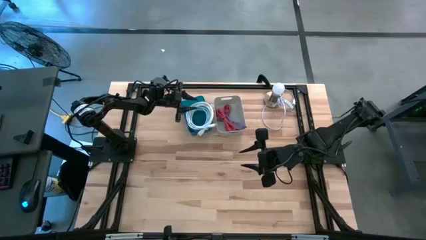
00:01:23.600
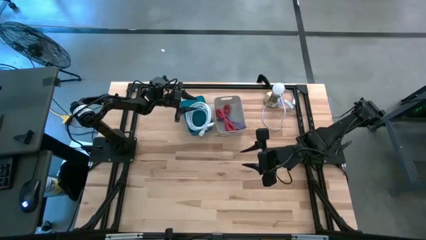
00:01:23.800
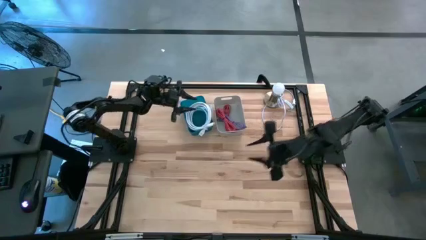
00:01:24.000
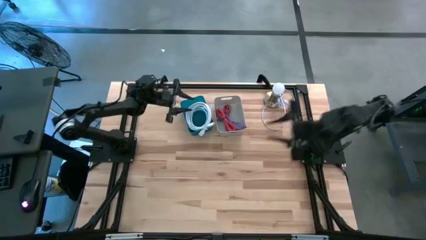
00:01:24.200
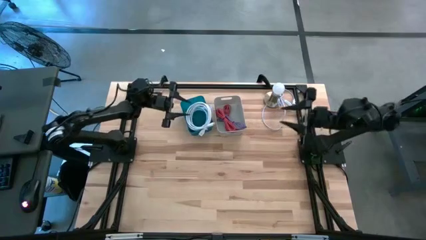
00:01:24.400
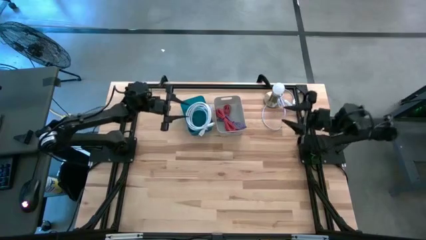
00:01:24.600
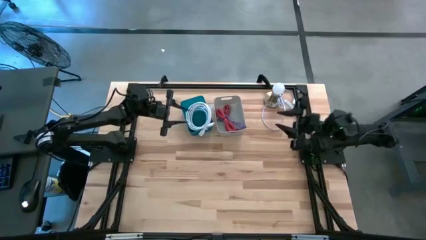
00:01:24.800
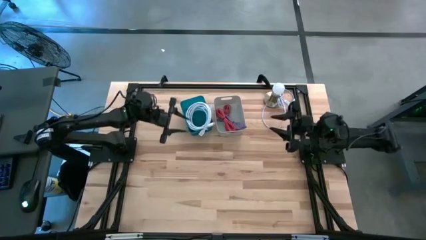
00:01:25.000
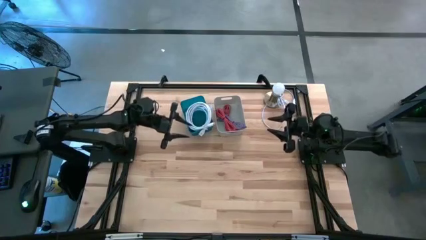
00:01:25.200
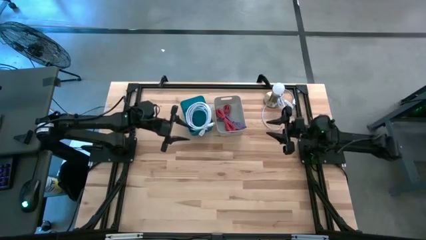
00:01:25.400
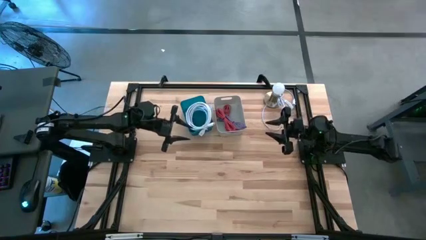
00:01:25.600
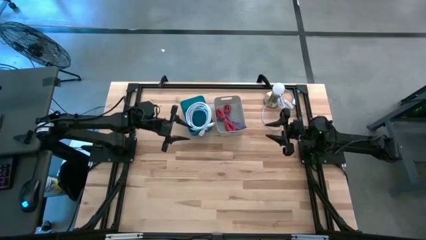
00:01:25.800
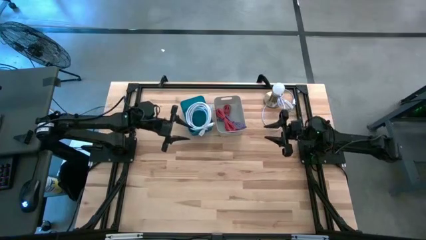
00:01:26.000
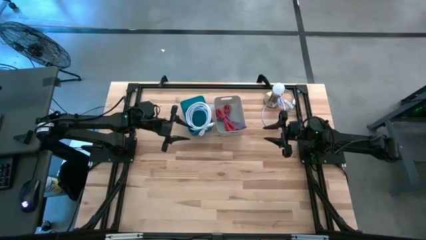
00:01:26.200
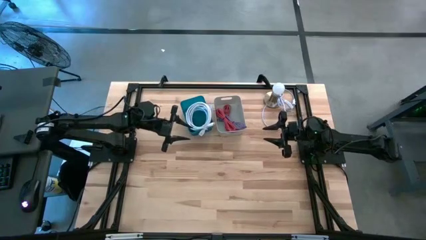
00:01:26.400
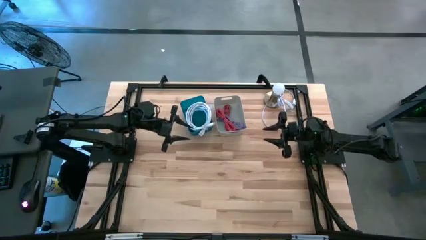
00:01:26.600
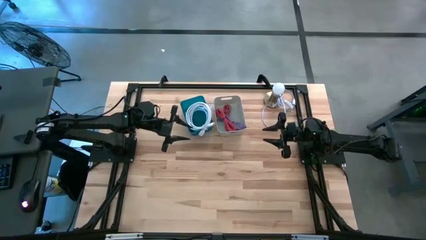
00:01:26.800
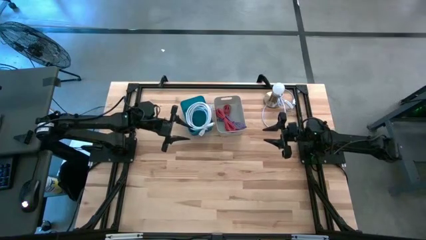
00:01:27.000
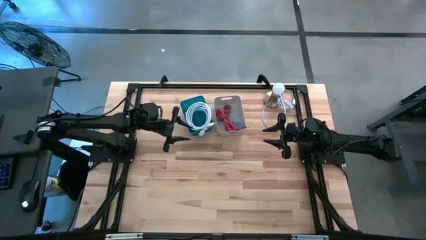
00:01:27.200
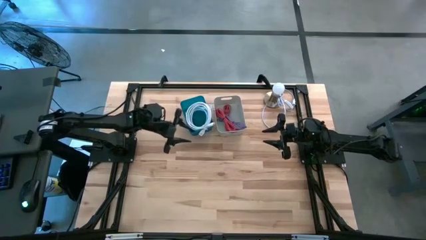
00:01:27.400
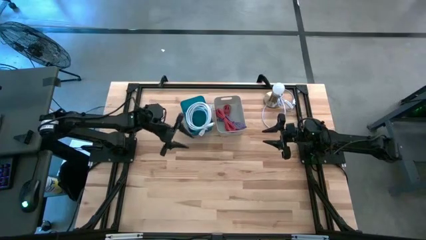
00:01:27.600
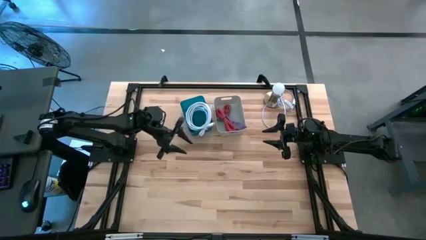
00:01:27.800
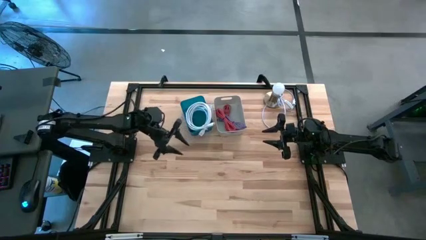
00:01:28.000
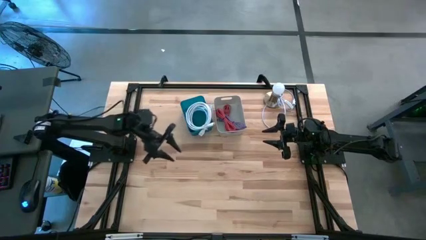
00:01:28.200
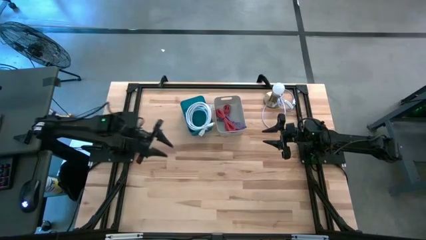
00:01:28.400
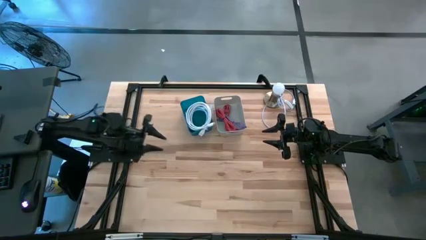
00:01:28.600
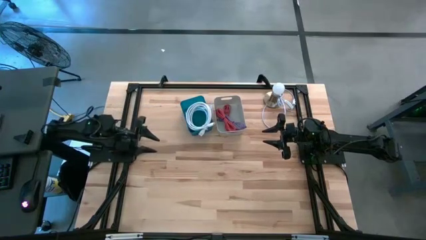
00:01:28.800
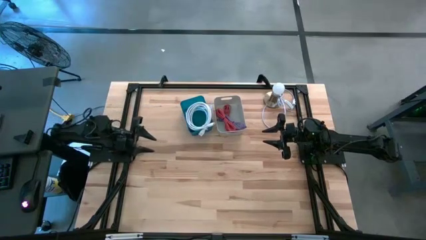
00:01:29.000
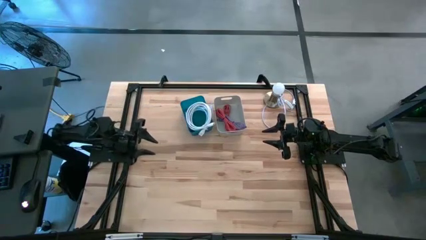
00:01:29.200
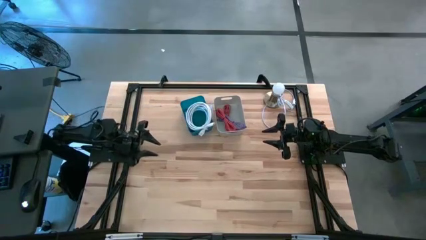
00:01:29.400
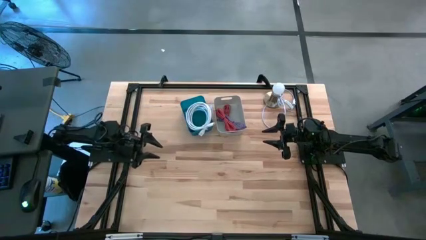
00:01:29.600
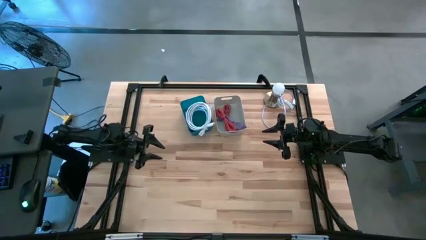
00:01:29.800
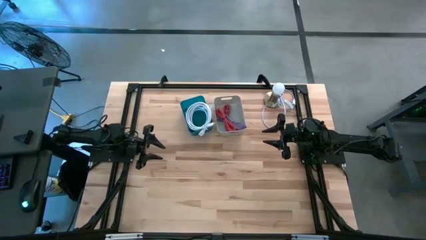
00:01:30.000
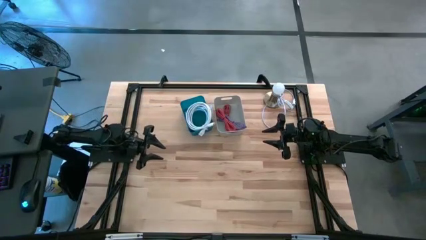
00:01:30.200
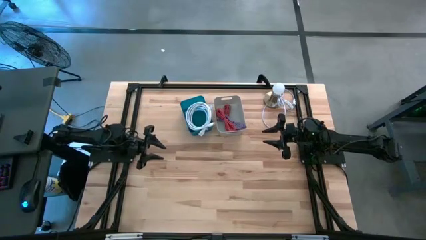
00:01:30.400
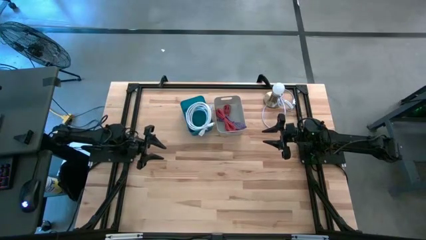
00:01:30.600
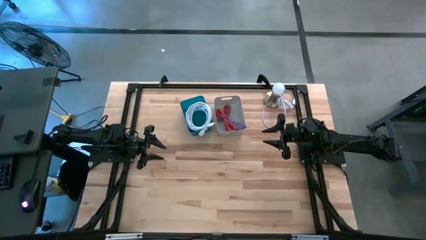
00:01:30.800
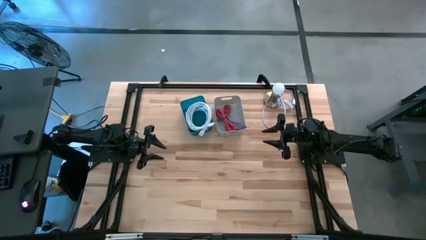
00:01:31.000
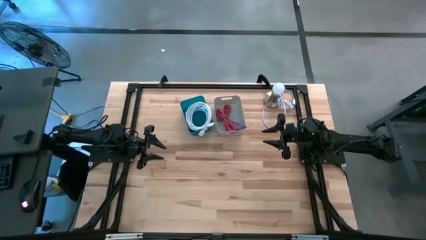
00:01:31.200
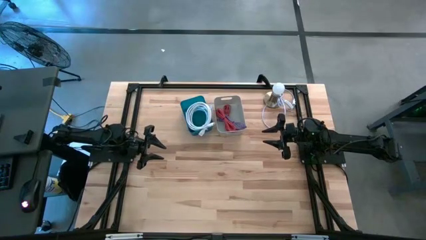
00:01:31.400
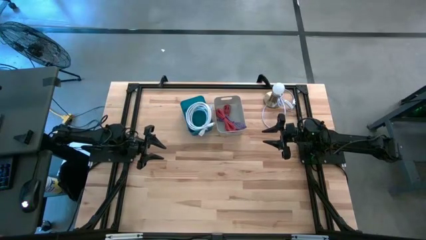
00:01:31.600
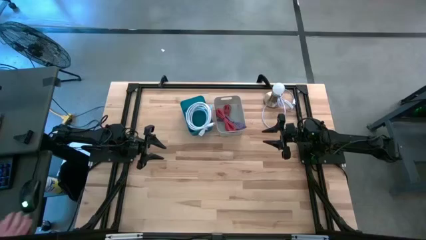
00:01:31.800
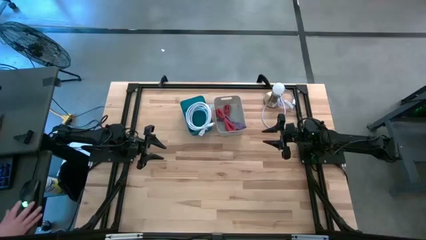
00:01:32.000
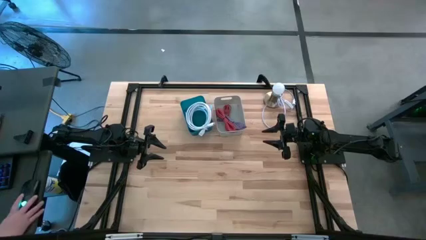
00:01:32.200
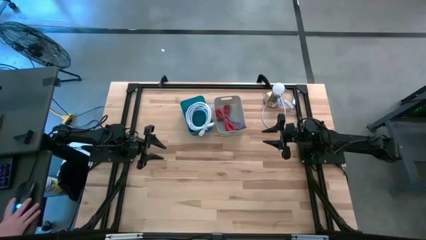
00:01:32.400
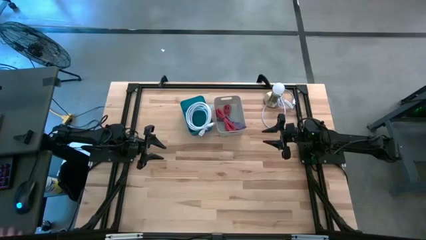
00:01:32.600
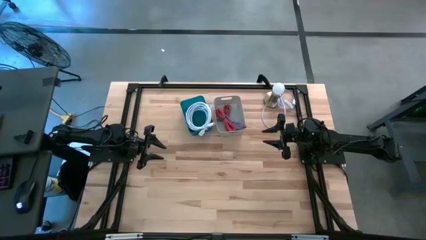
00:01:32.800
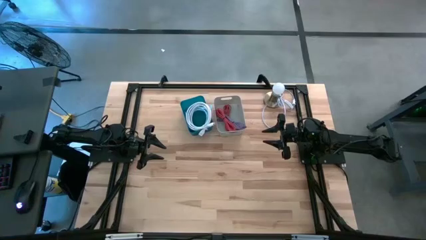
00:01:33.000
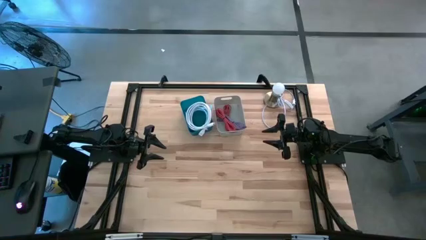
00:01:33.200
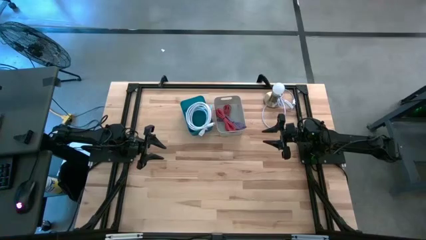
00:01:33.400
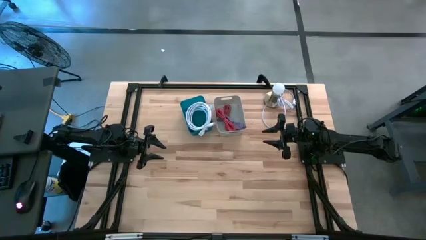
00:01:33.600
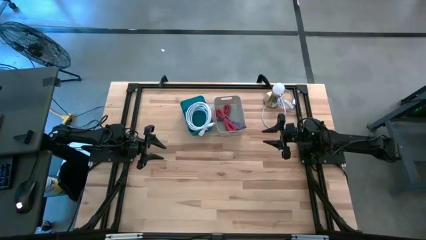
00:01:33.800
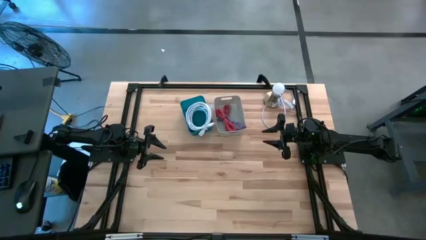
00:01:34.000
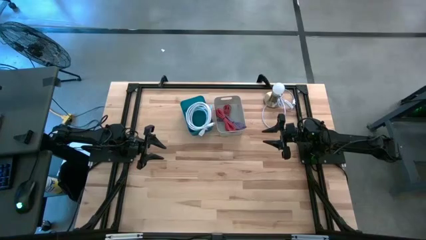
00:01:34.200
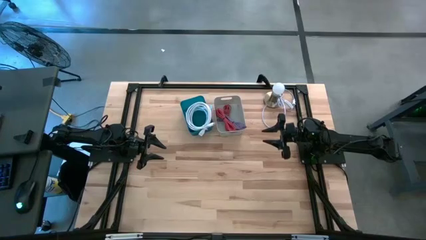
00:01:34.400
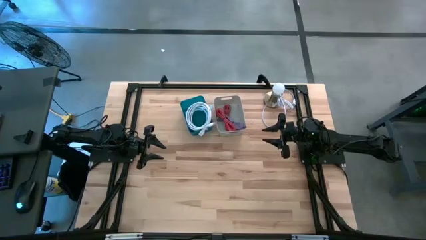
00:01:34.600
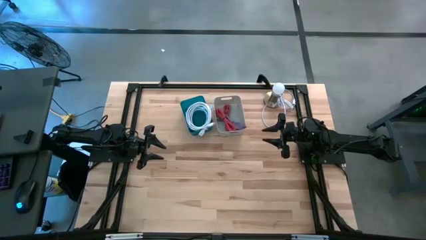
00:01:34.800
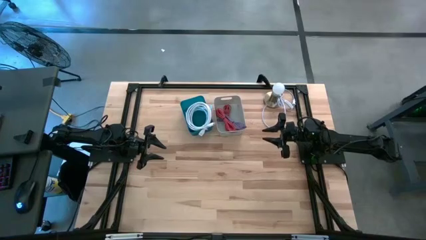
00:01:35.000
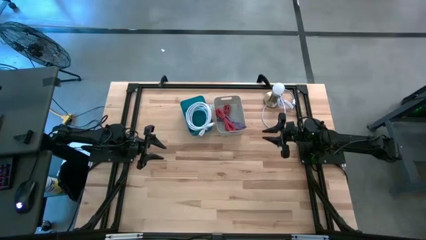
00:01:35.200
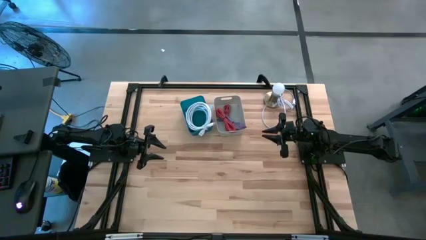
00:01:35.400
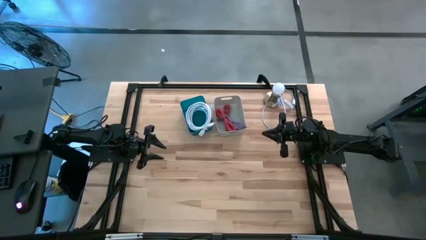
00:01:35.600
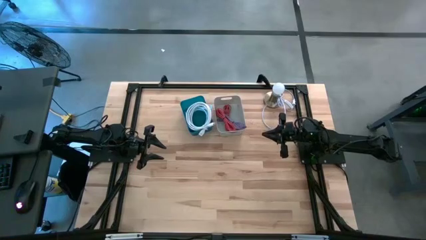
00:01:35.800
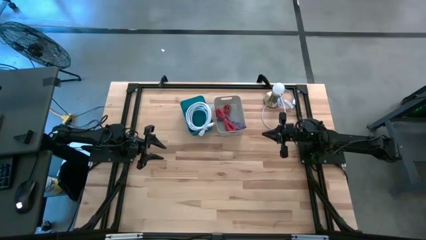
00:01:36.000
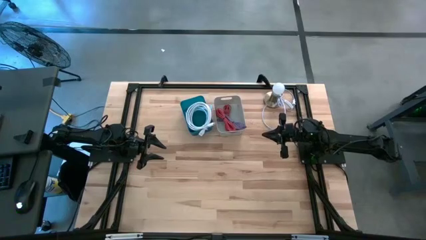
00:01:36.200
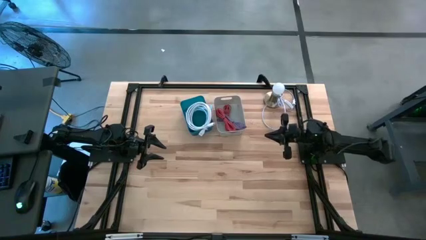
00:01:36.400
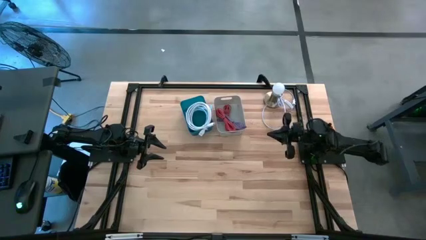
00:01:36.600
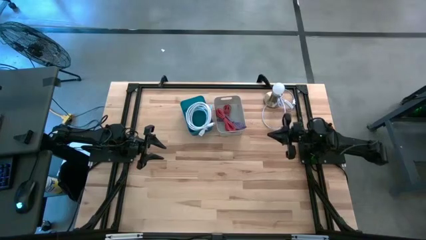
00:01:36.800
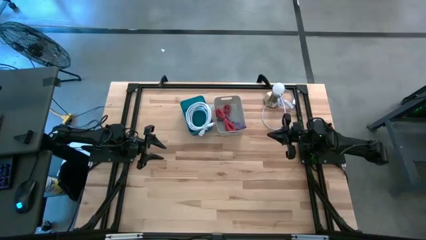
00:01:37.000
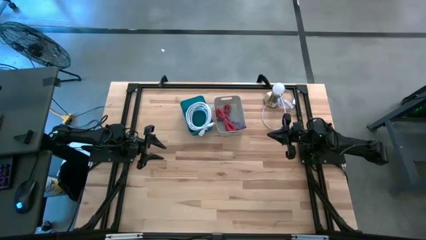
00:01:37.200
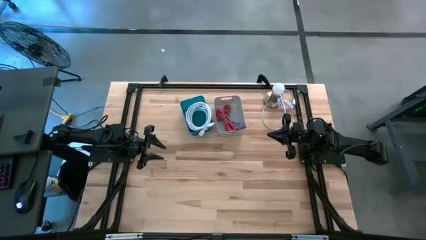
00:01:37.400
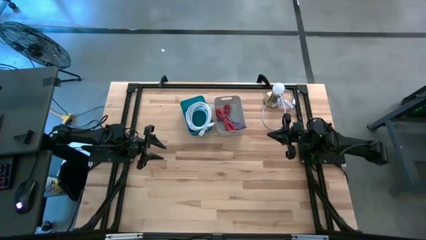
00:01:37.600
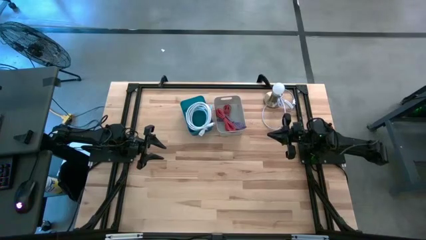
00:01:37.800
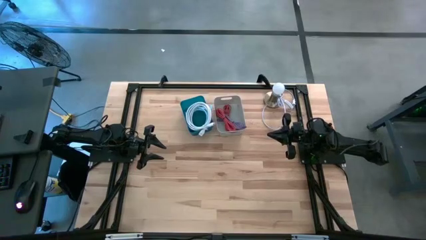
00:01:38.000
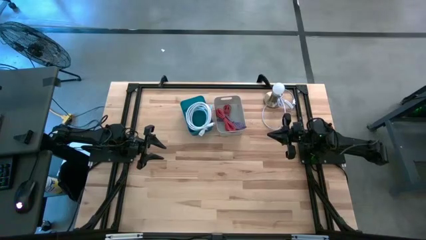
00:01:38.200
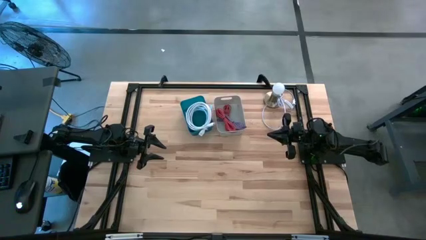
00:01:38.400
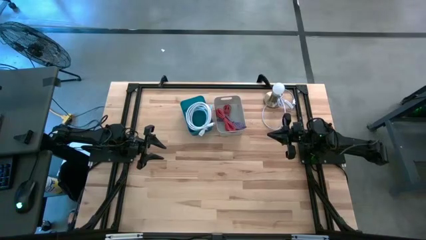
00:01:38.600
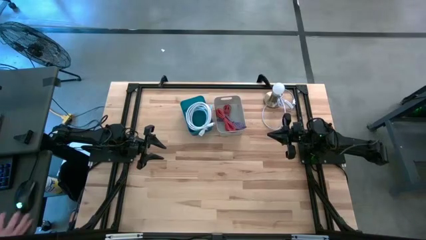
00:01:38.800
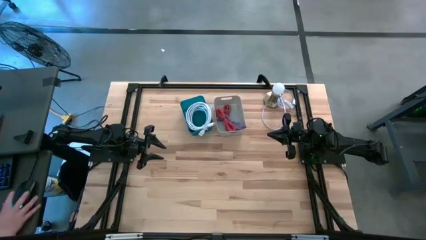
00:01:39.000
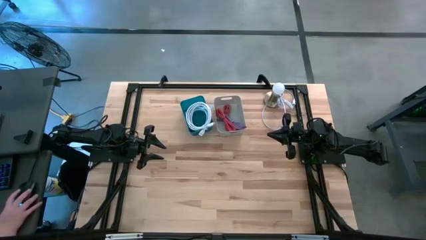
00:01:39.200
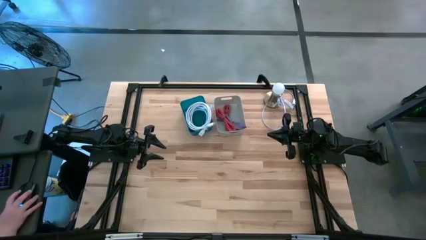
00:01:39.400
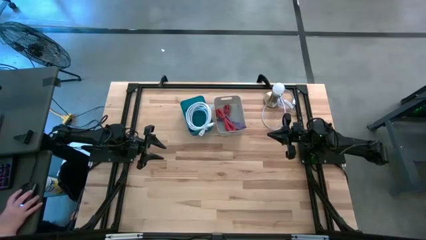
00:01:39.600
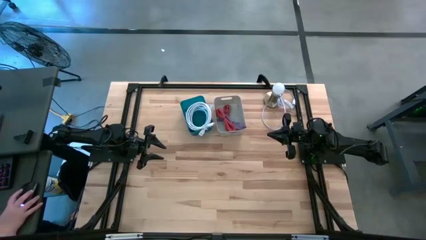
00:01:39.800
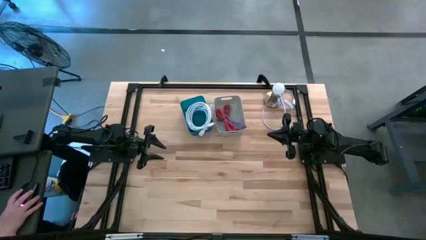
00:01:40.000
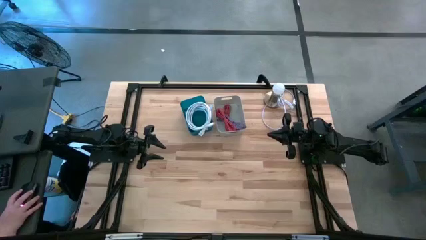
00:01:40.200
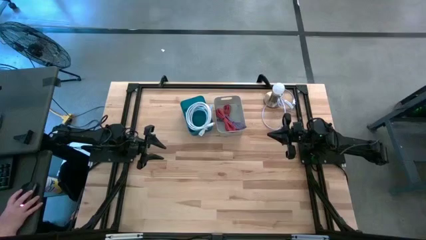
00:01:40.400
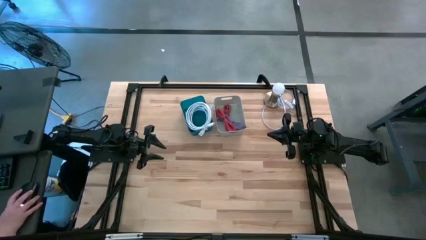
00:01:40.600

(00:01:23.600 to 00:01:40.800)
Task: Pick & Place USB Port
Return to Home Position
